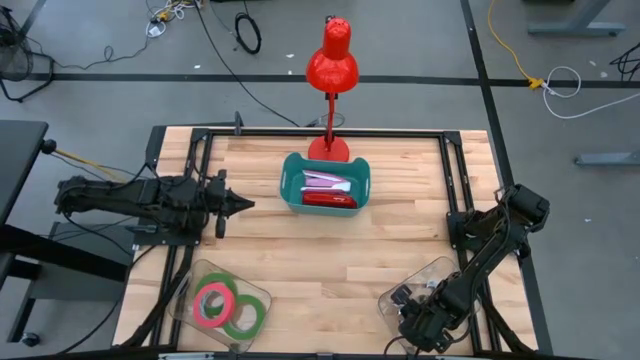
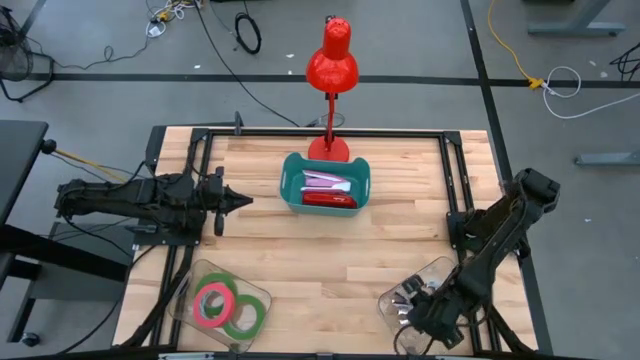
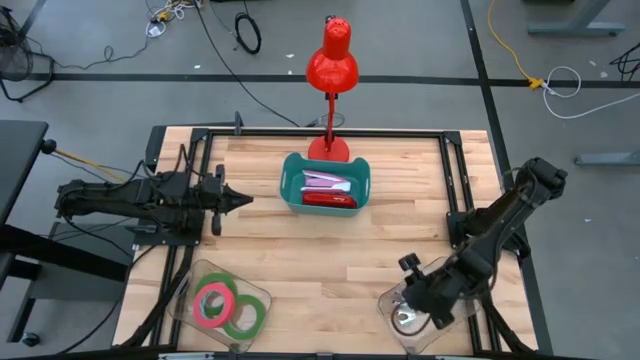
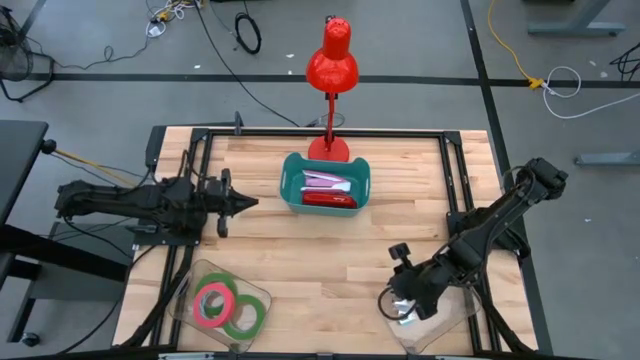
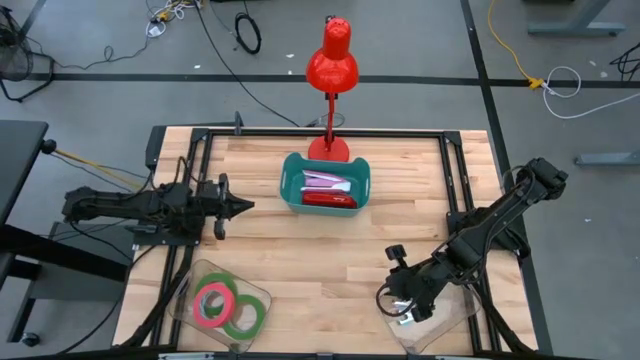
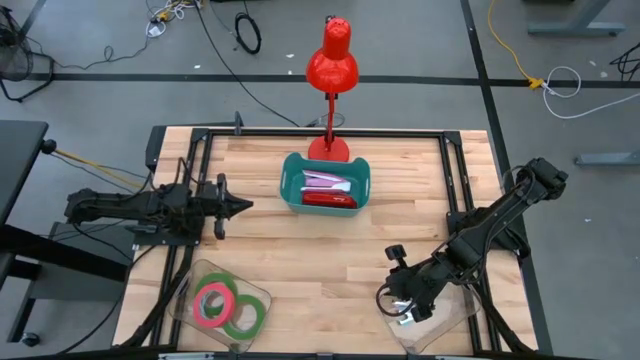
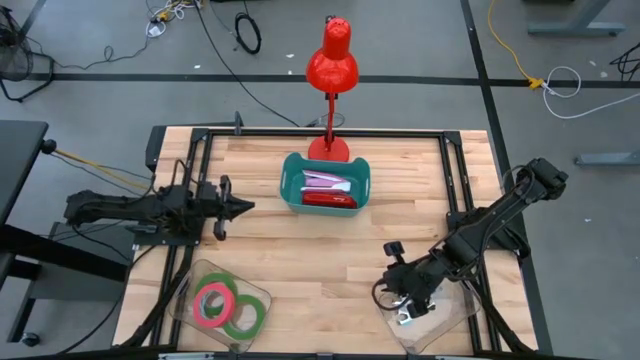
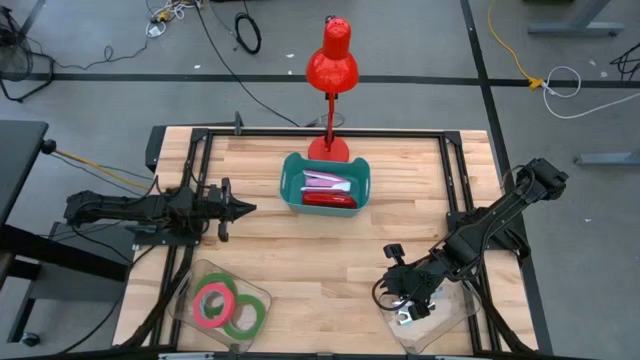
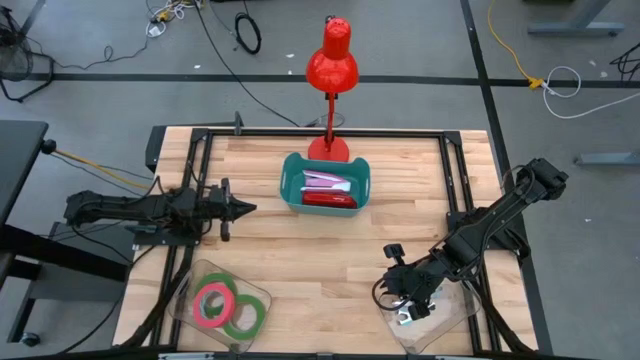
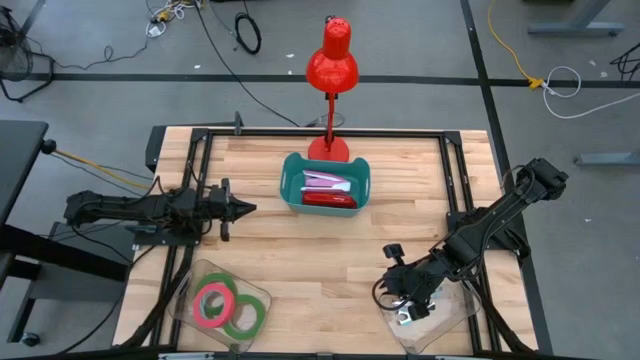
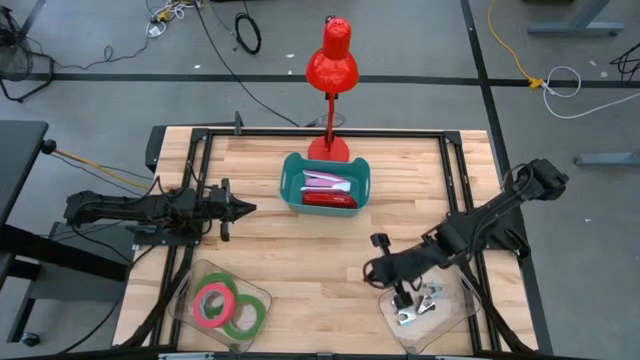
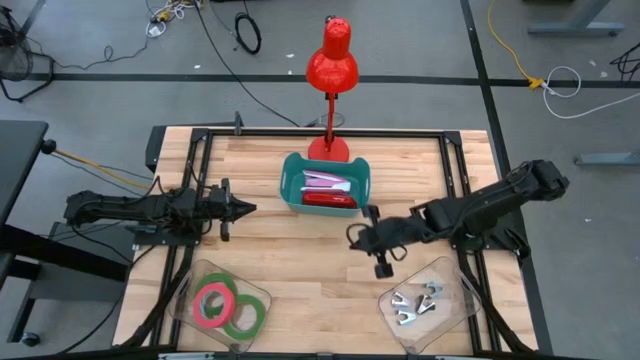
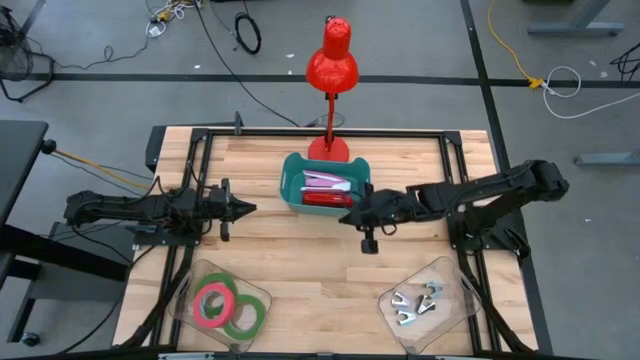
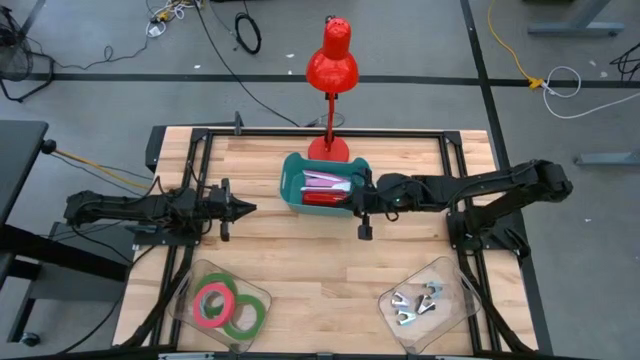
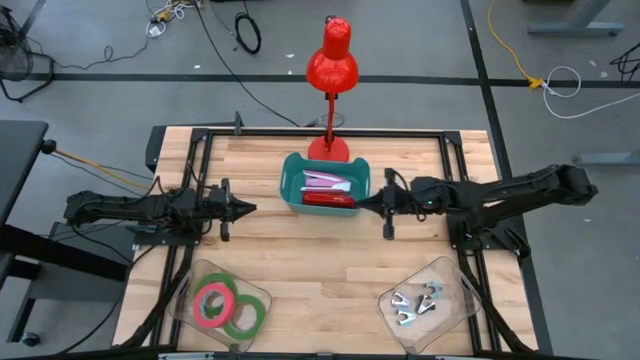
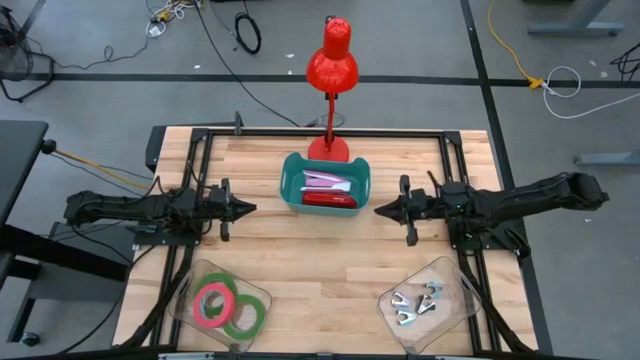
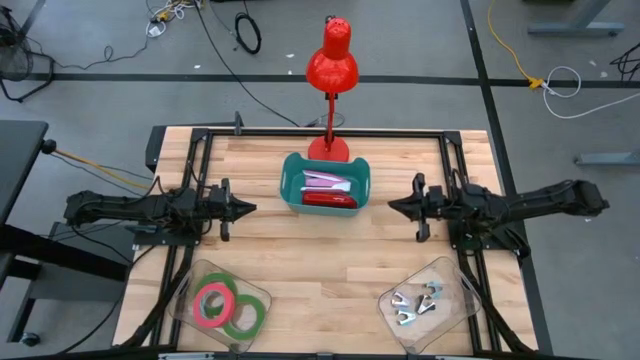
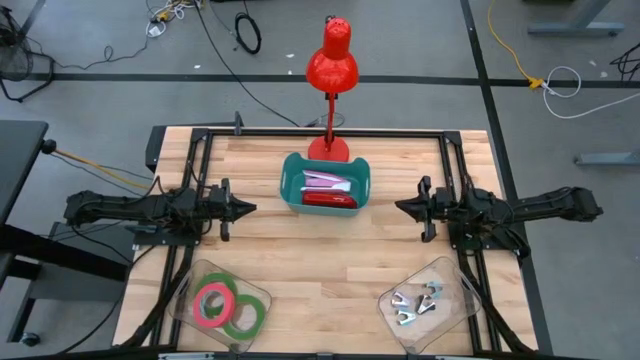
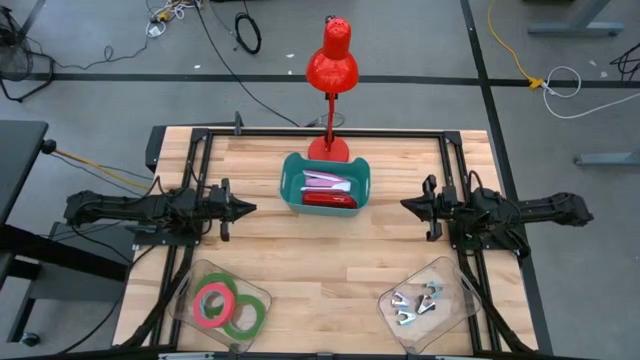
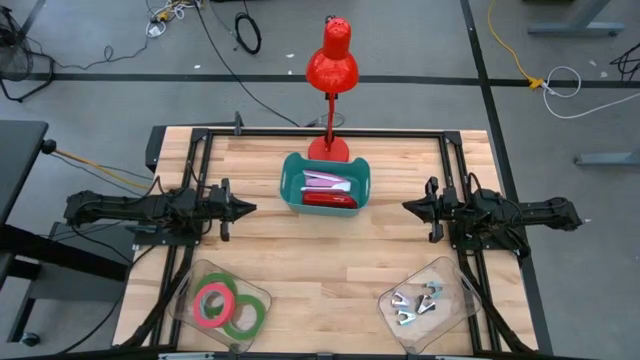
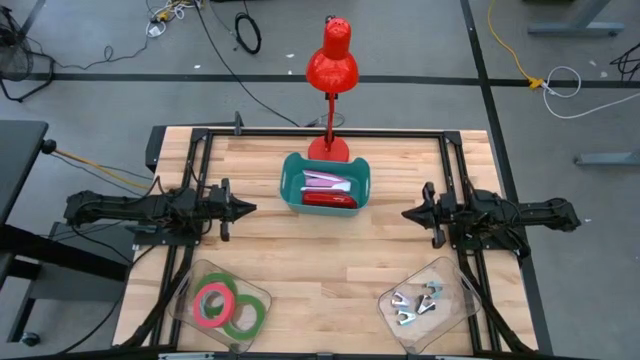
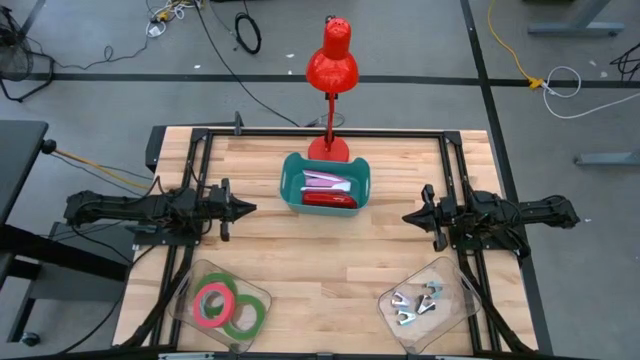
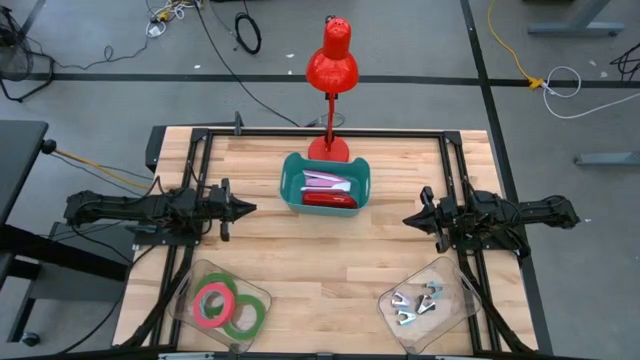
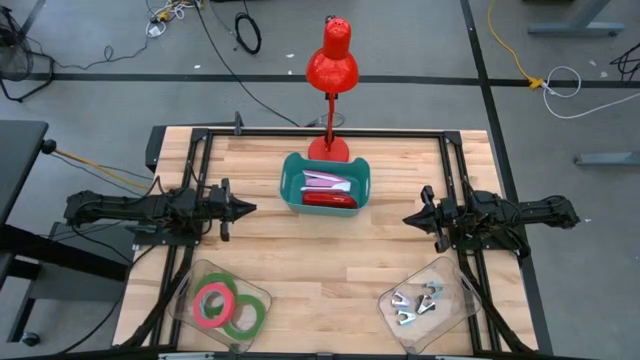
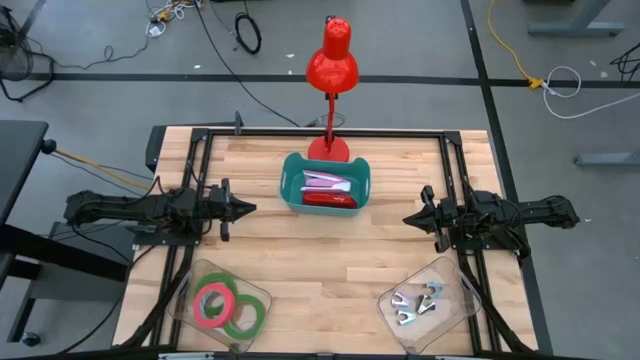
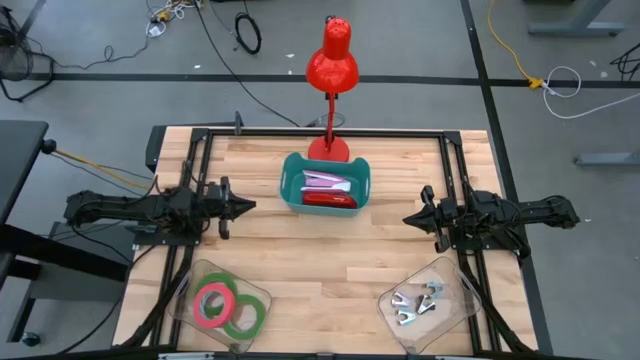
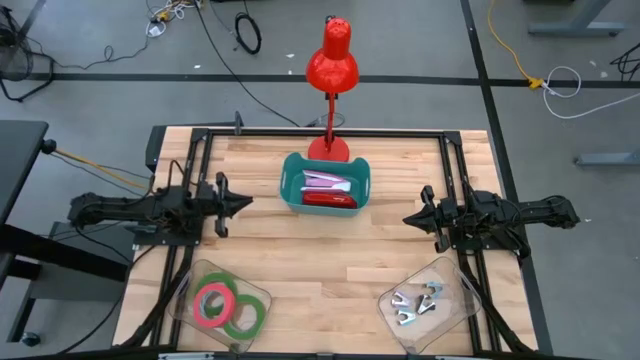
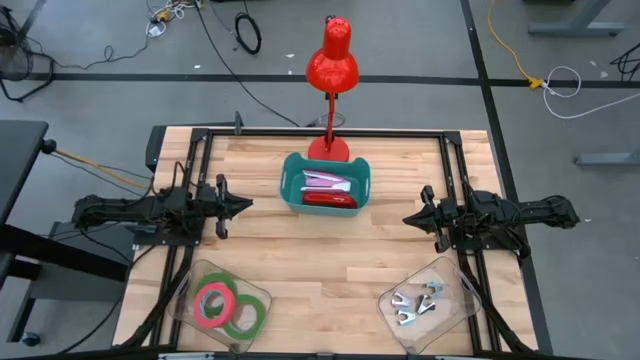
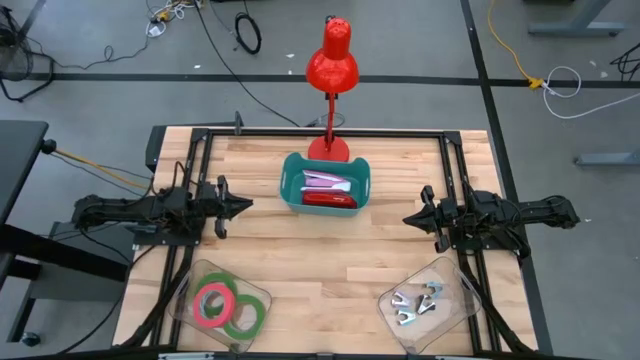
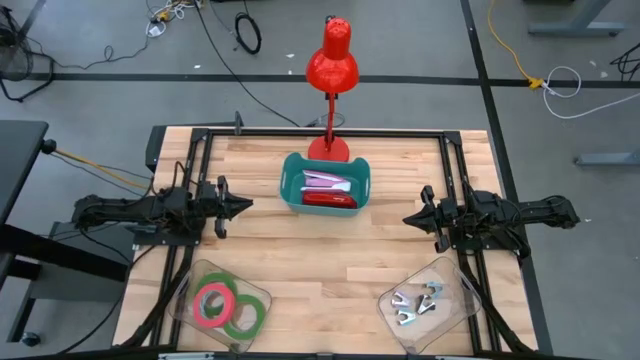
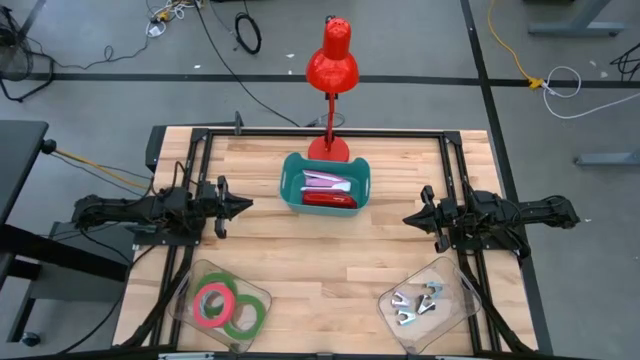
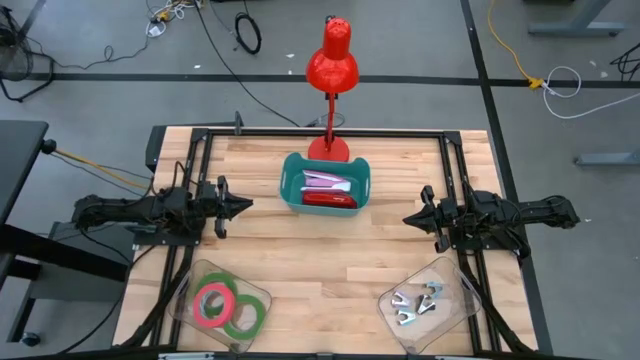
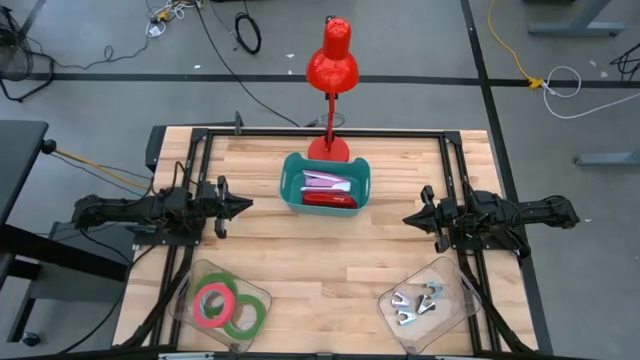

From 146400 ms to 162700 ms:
Task: Pick and place Stapler, Stapler remover, tape
Return to Home Position
